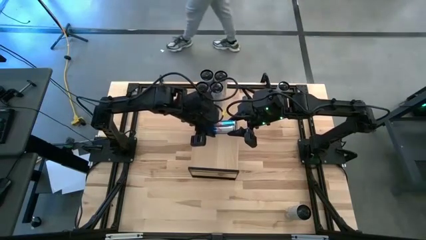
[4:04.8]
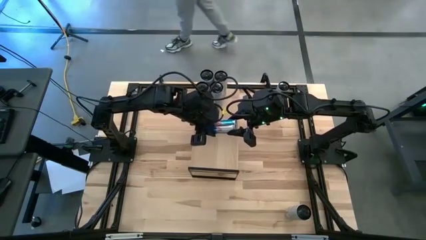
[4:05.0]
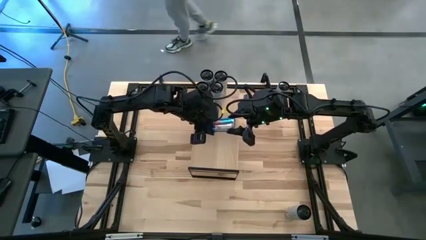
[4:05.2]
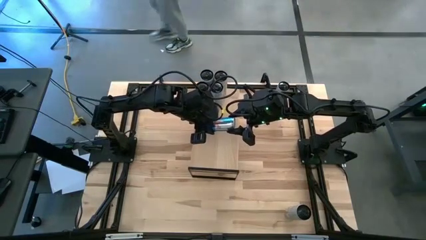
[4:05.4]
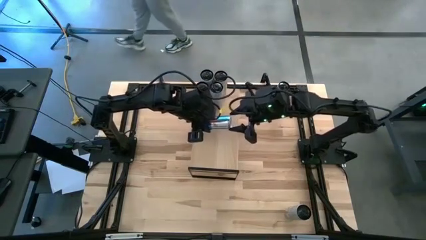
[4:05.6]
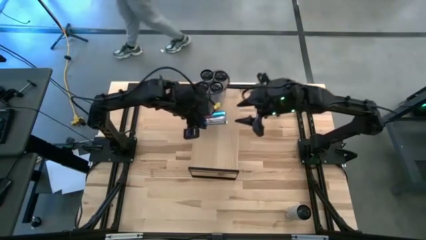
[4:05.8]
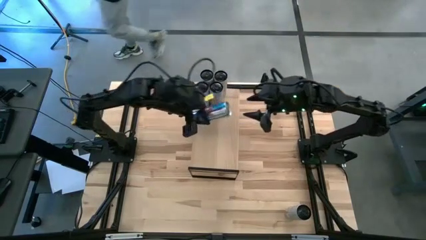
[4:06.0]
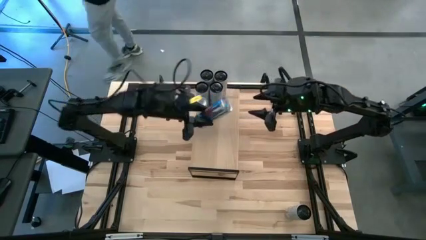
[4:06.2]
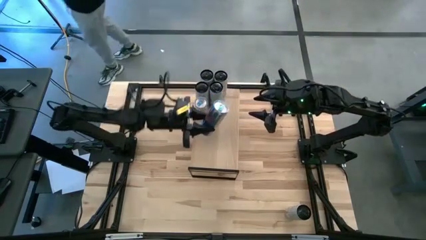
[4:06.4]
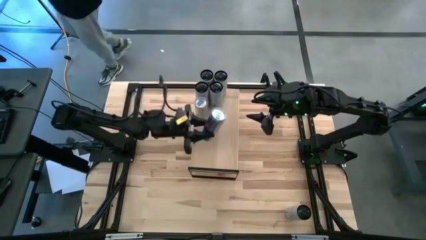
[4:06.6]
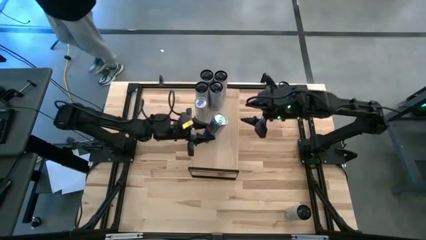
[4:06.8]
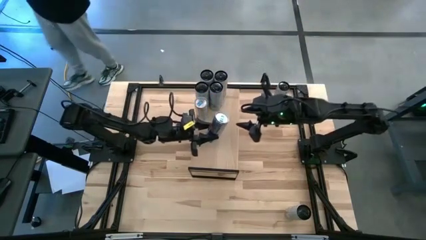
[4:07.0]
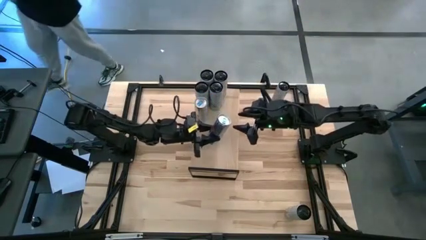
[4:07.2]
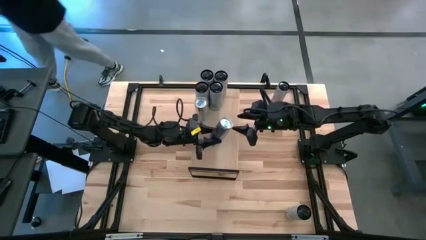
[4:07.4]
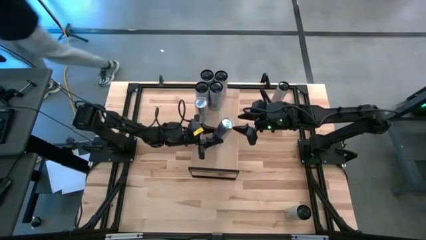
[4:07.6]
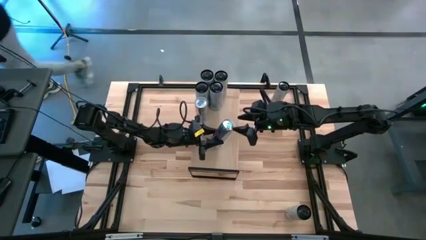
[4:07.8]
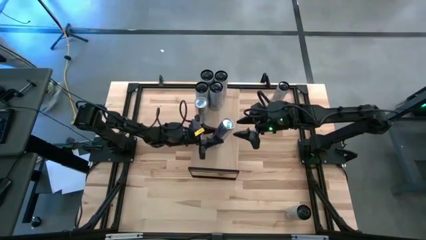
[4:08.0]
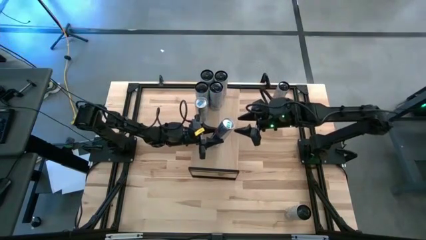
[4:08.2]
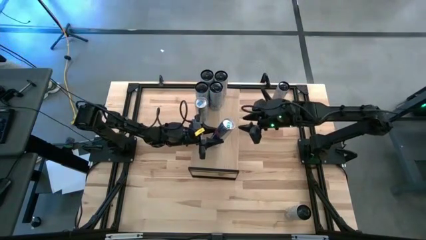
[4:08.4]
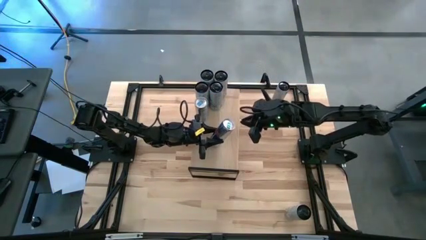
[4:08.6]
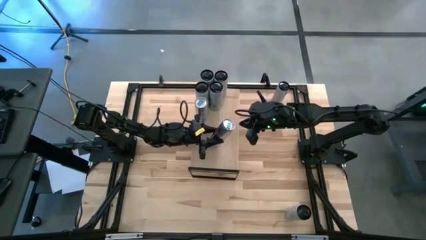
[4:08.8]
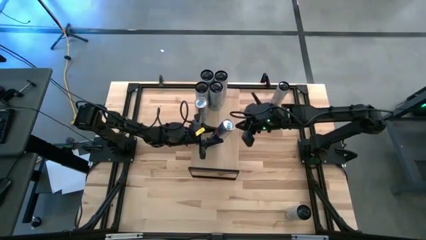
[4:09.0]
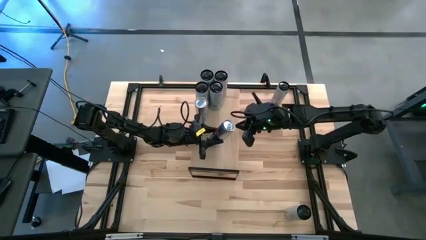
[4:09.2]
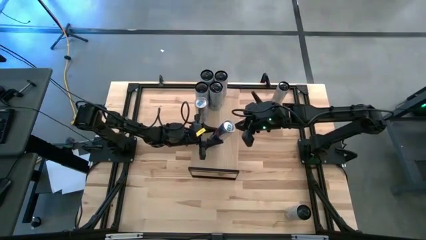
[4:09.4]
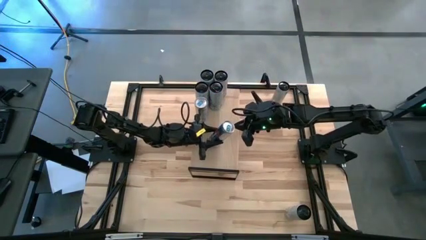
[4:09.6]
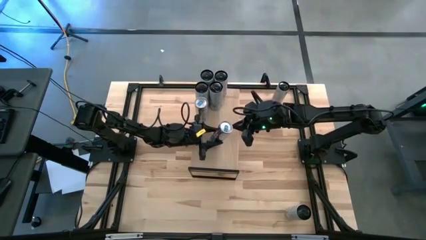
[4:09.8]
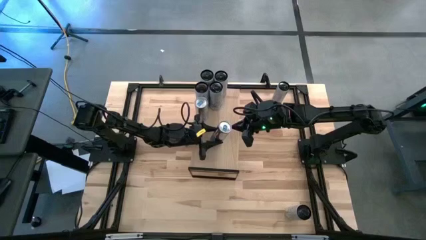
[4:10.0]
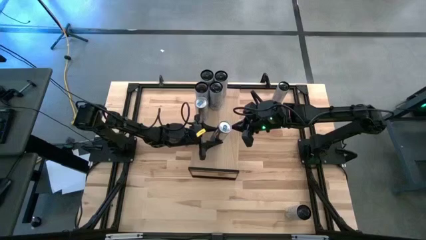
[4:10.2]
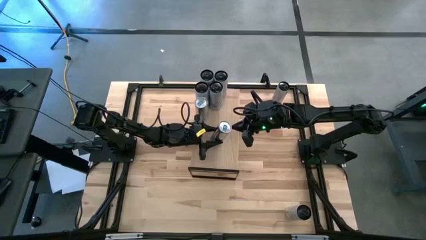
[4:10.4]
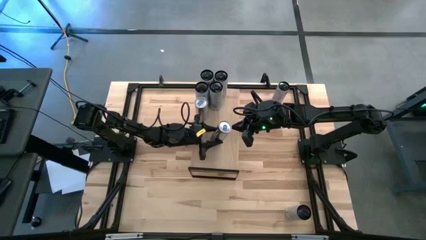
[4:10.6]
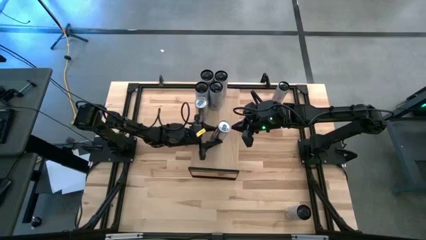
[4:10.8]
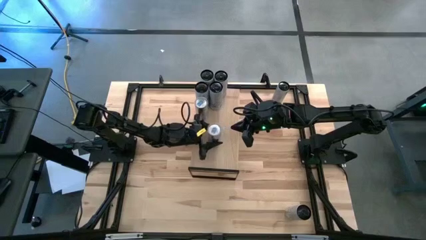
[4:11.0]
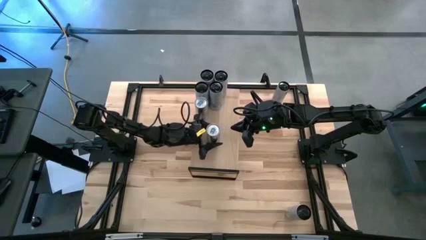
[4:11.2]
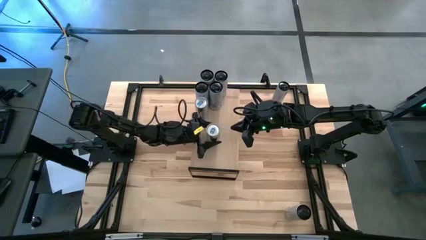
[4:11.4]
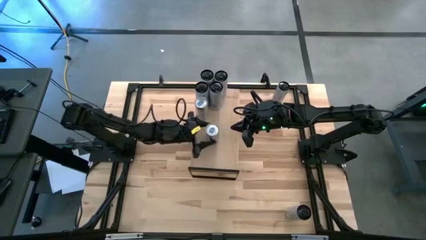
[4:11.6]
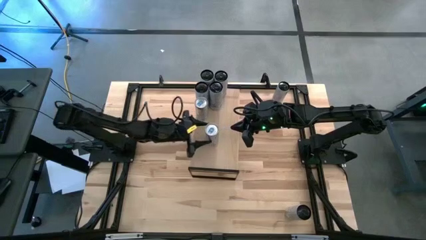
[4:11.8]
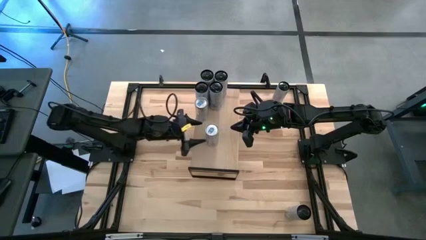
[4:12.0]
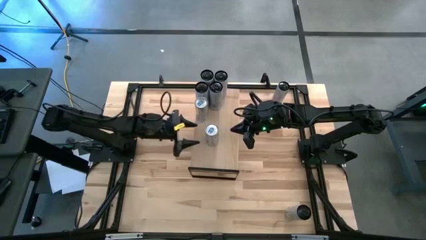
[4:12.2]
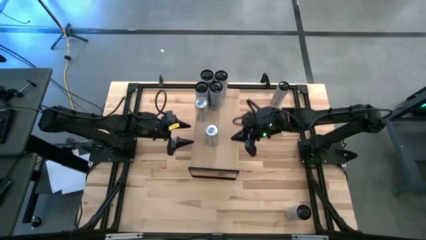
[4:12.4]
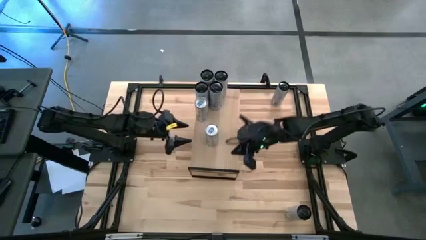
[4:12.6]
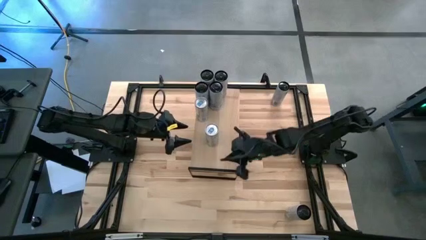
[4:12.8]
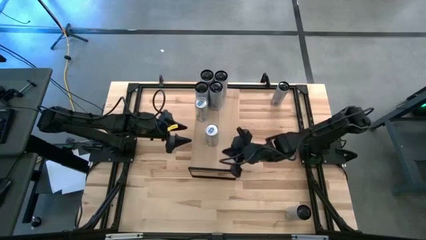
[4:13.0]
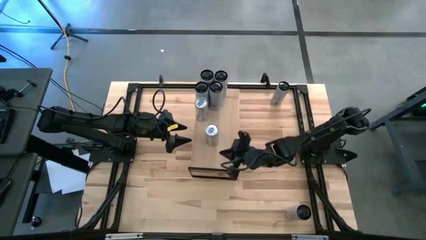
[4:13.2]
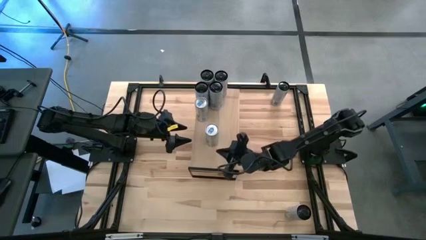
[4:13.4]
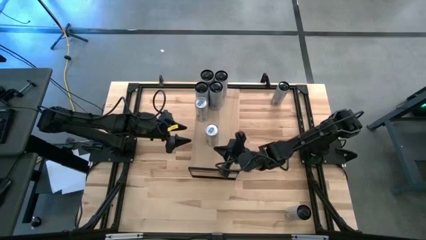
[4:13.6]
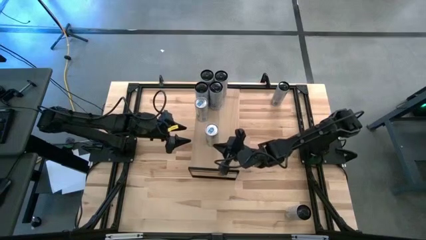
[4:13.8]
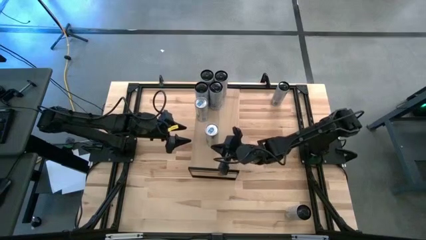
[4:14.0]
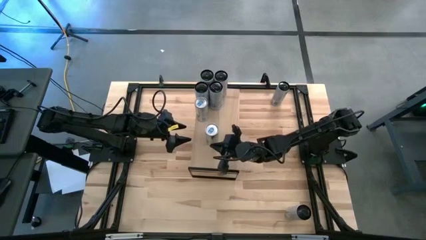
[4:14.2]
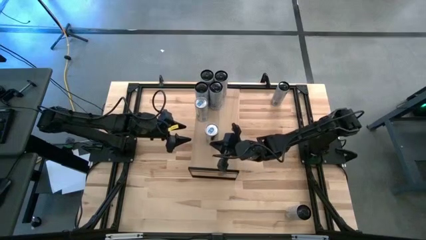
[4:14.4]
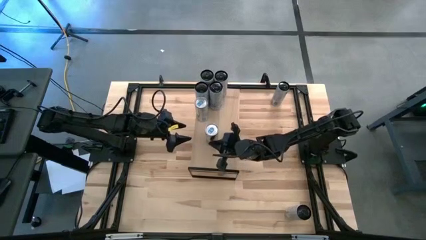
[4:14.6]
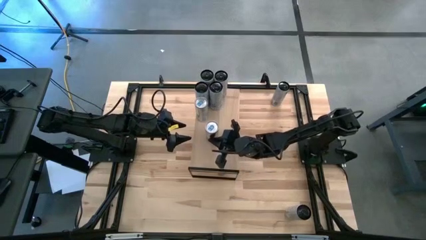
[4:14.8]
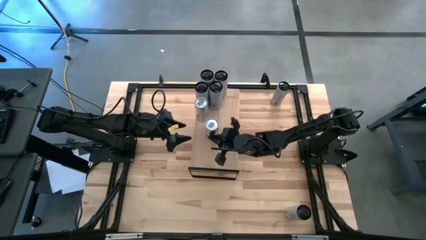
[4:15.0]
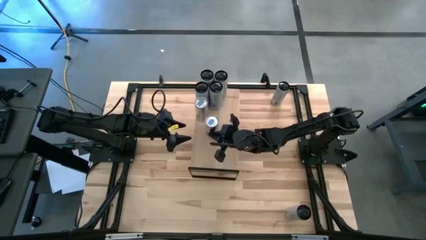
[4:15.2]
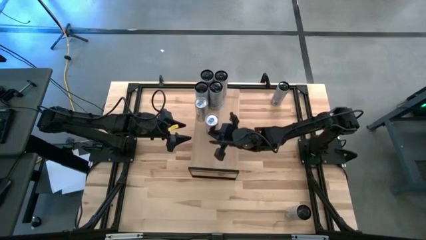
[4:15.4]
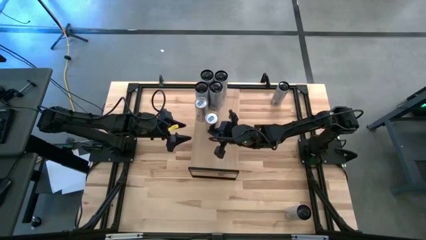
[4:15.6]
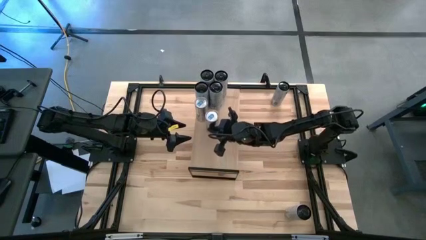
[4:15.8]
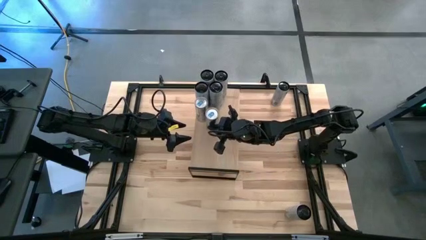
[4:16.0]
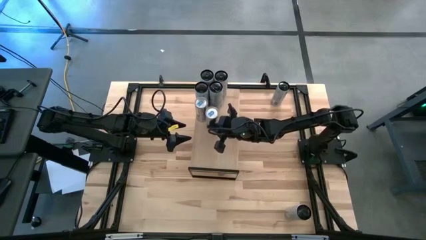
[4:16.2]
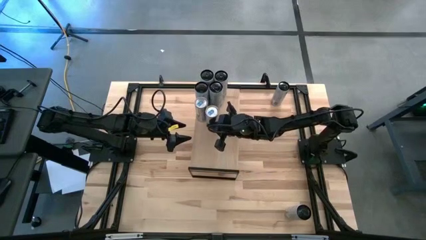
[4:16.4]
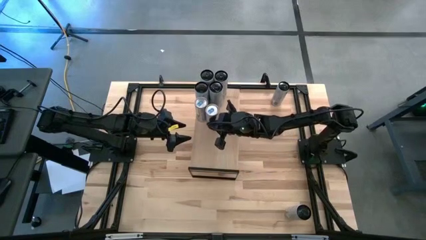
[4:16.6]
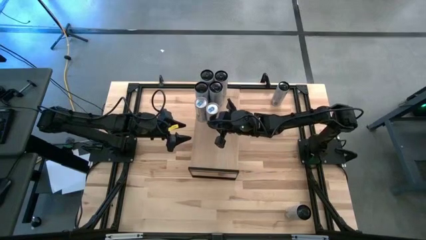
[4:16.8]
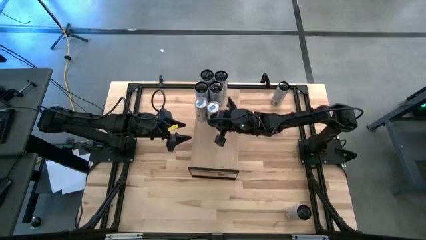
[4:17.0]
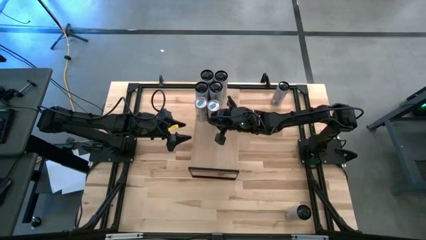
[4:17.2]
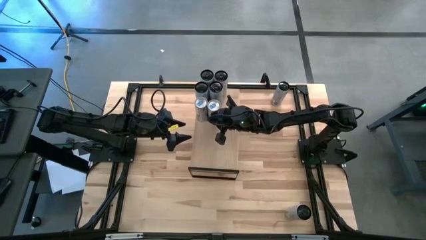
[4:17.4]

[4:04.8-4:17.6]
Task: Place canned beverage on shelf
Put the blue soda can on the shelf aligned with the blue soda can
